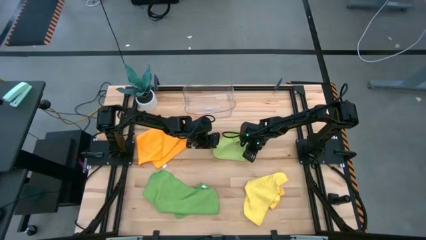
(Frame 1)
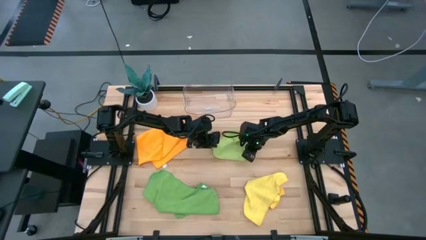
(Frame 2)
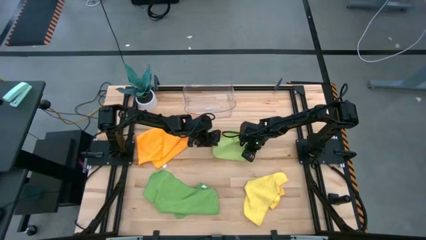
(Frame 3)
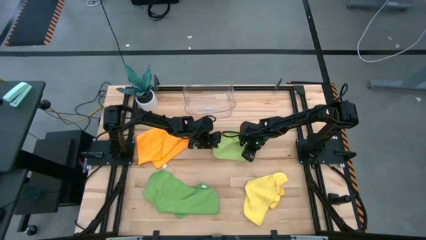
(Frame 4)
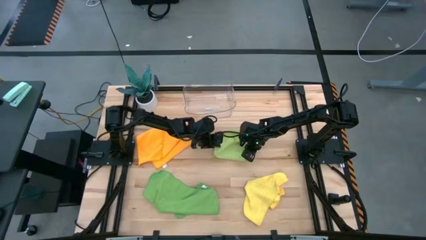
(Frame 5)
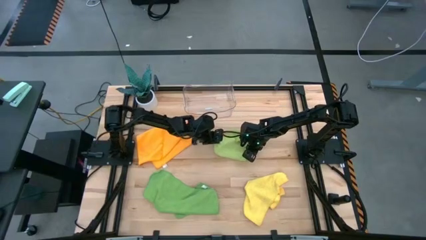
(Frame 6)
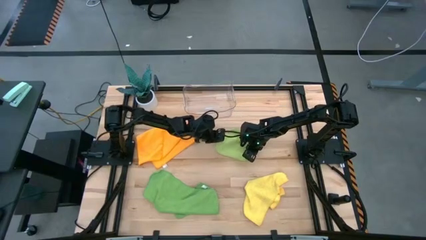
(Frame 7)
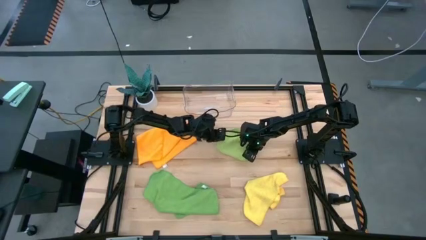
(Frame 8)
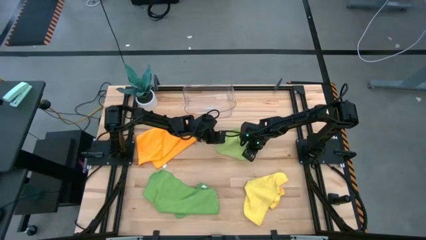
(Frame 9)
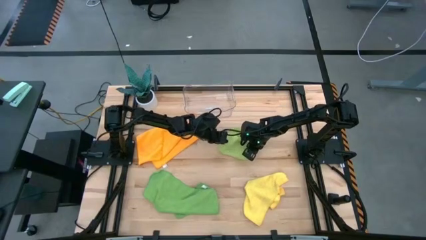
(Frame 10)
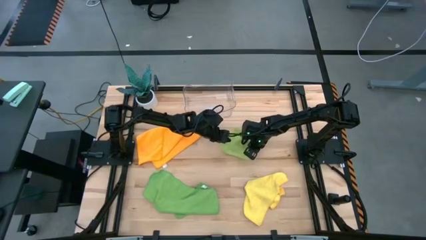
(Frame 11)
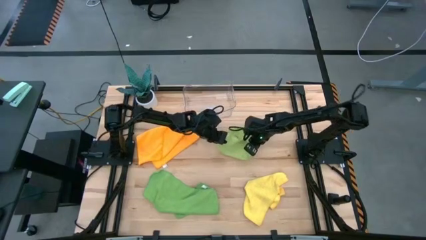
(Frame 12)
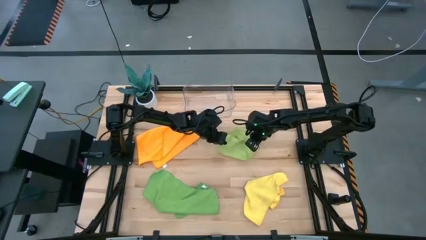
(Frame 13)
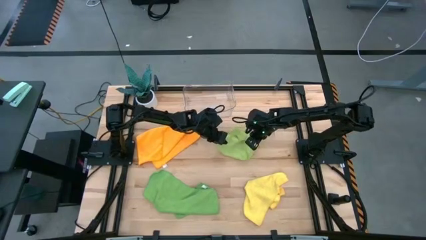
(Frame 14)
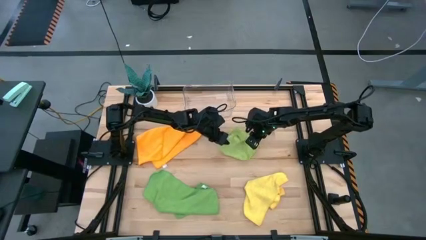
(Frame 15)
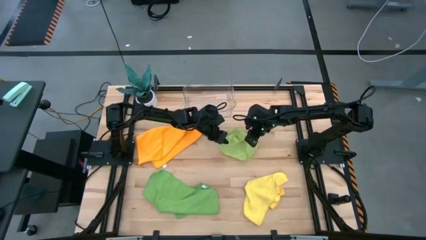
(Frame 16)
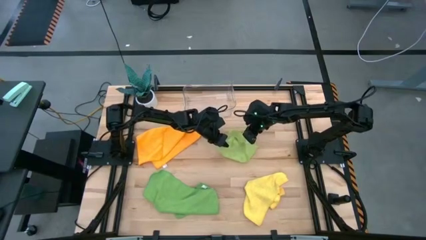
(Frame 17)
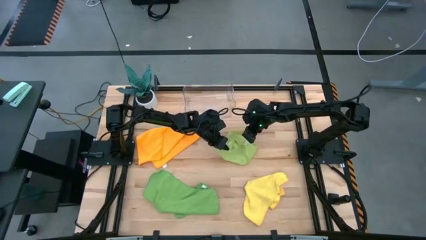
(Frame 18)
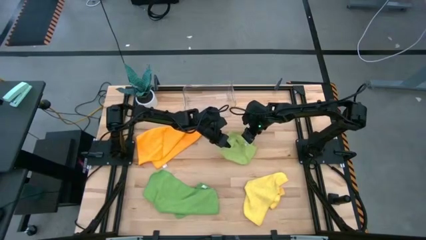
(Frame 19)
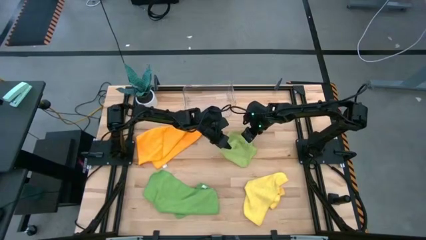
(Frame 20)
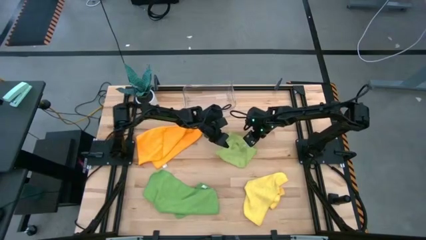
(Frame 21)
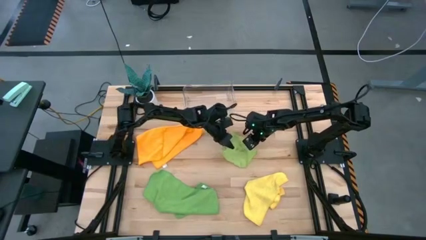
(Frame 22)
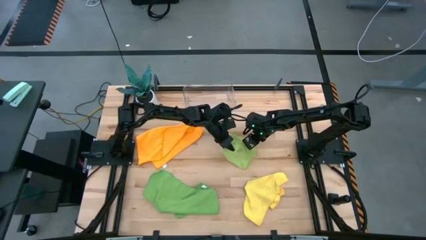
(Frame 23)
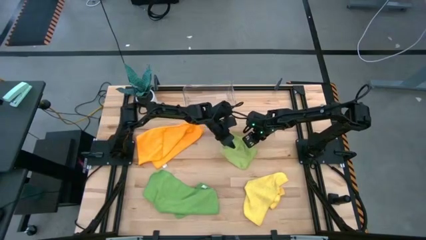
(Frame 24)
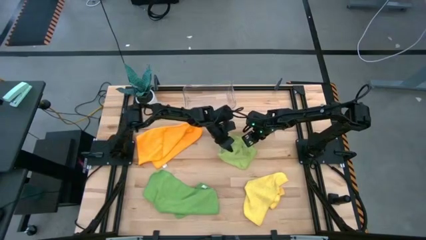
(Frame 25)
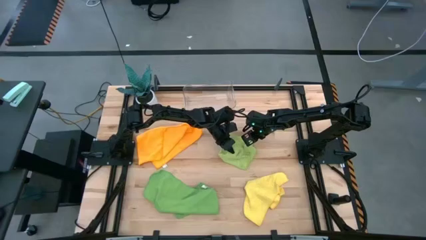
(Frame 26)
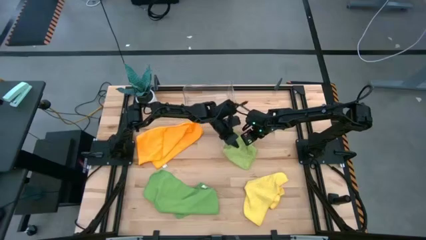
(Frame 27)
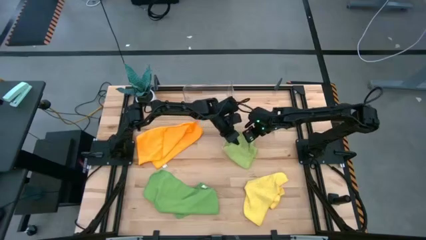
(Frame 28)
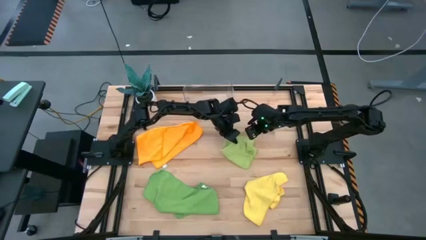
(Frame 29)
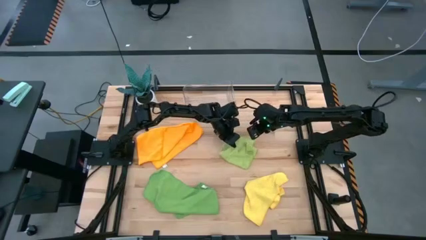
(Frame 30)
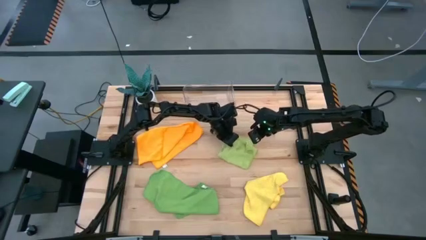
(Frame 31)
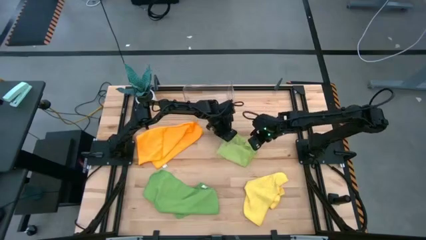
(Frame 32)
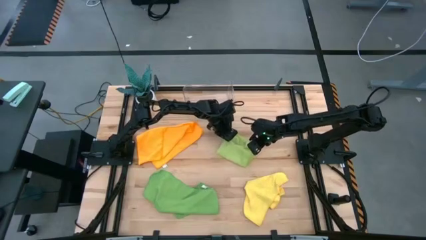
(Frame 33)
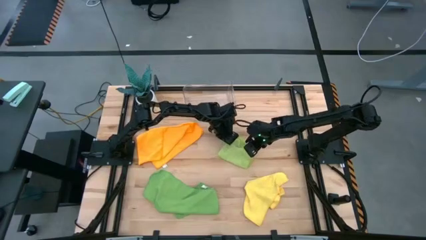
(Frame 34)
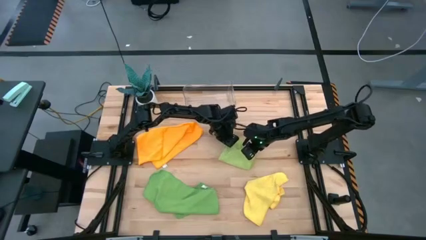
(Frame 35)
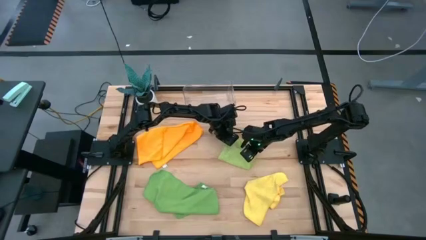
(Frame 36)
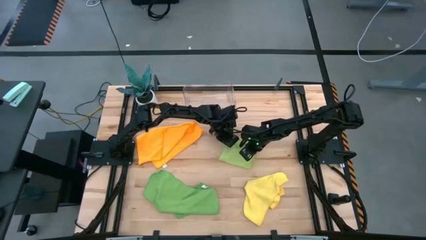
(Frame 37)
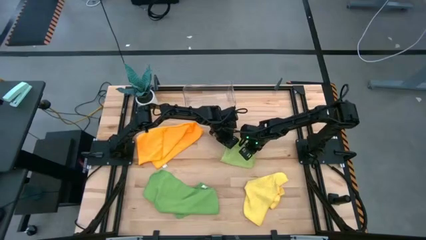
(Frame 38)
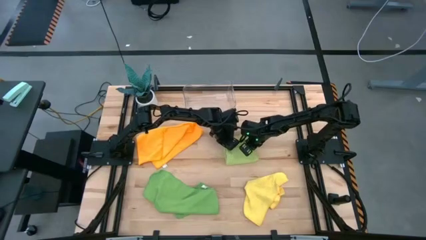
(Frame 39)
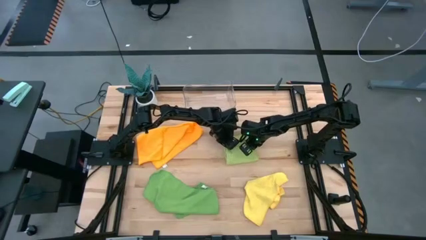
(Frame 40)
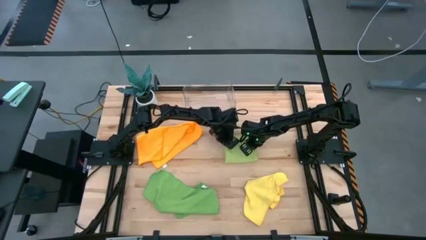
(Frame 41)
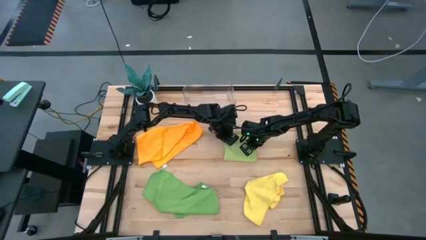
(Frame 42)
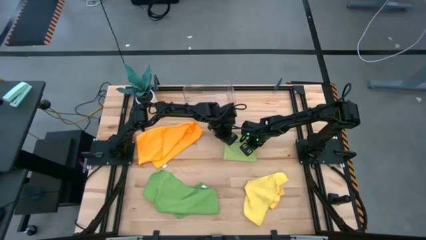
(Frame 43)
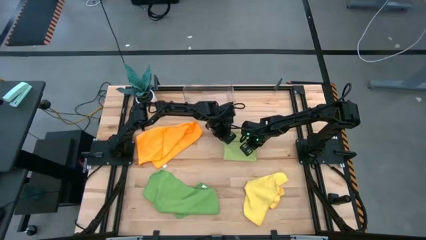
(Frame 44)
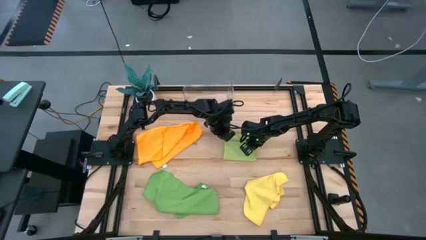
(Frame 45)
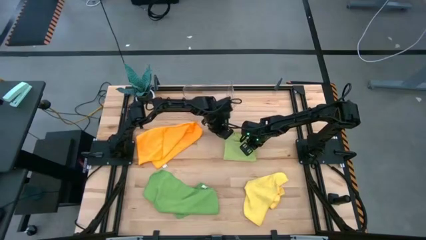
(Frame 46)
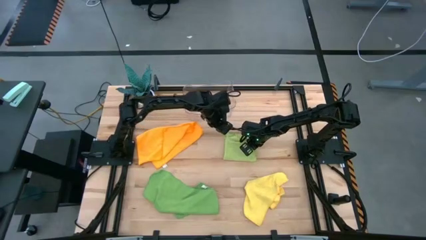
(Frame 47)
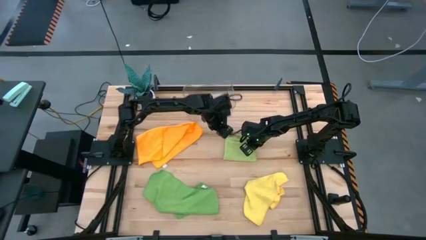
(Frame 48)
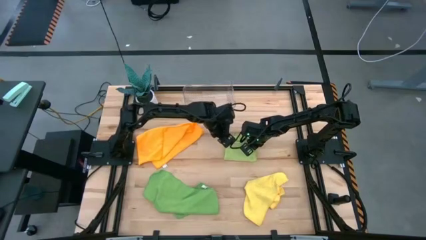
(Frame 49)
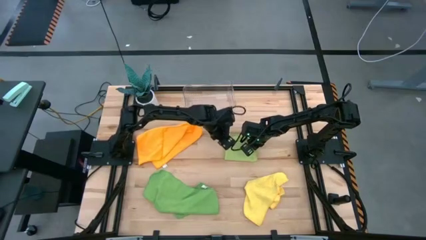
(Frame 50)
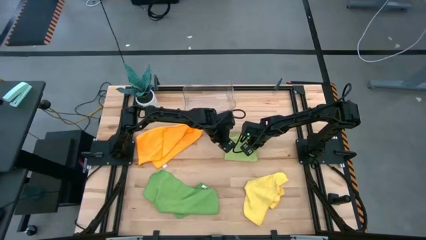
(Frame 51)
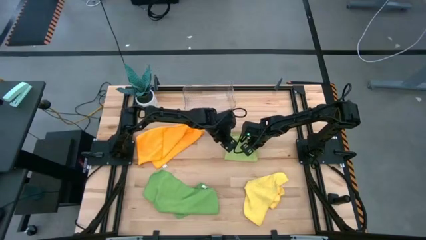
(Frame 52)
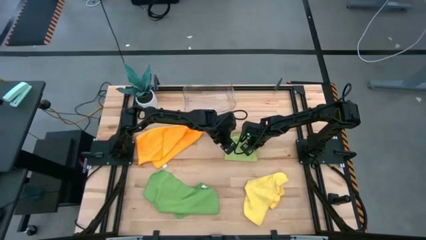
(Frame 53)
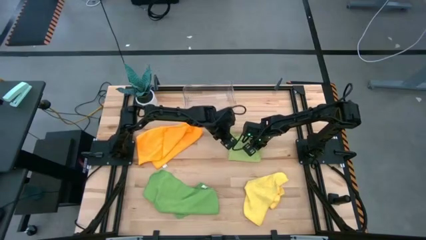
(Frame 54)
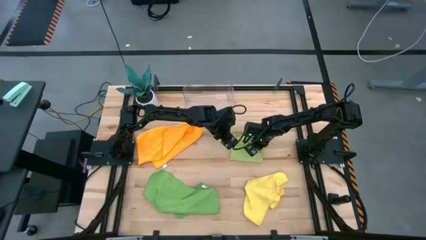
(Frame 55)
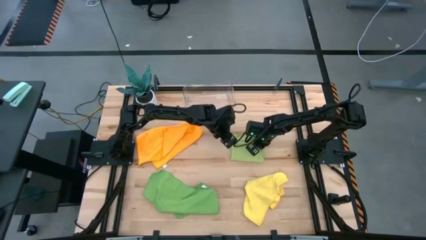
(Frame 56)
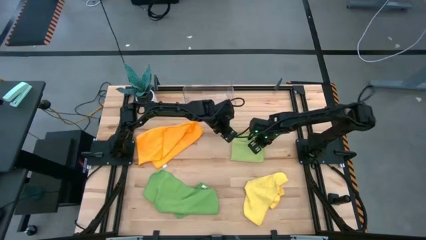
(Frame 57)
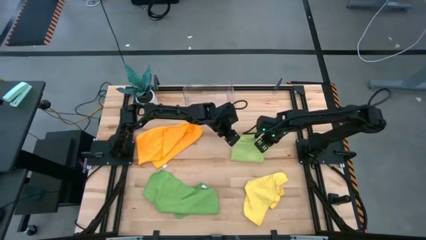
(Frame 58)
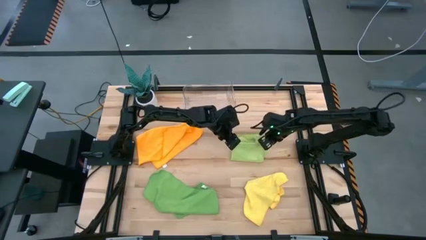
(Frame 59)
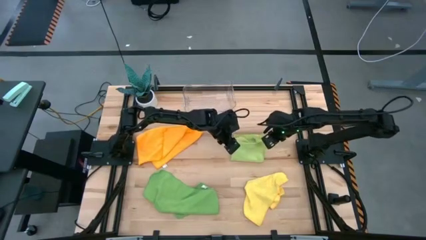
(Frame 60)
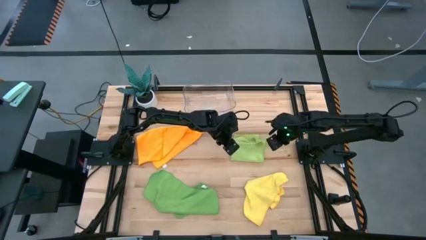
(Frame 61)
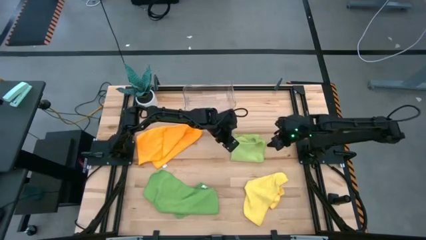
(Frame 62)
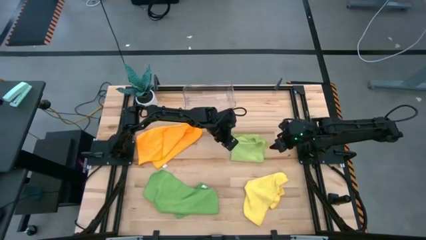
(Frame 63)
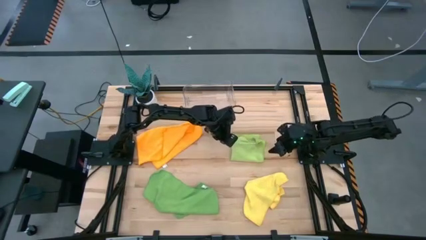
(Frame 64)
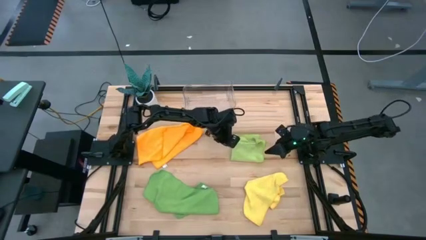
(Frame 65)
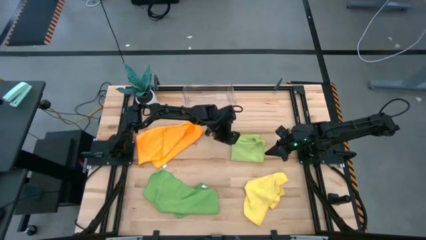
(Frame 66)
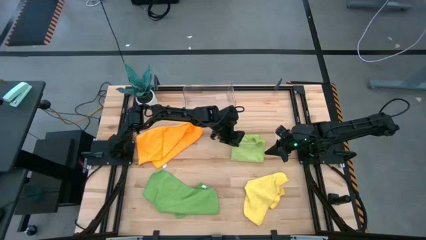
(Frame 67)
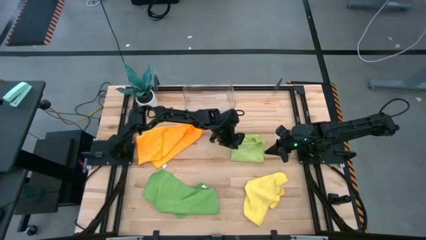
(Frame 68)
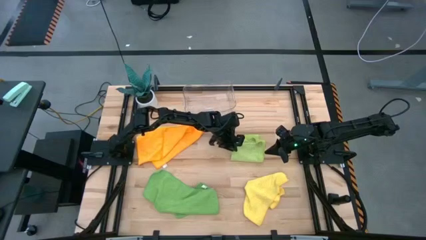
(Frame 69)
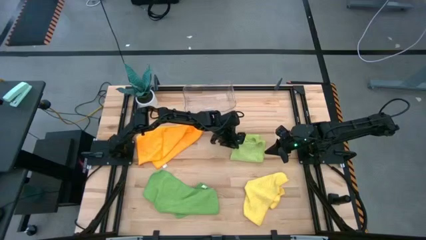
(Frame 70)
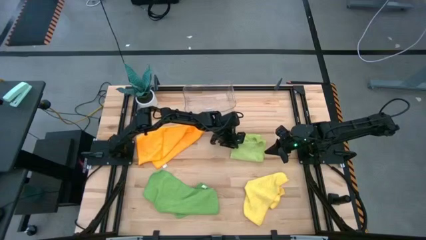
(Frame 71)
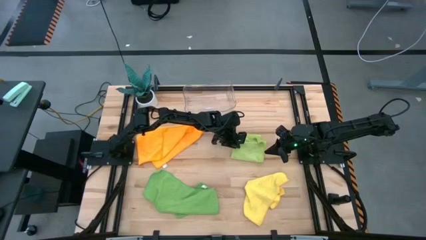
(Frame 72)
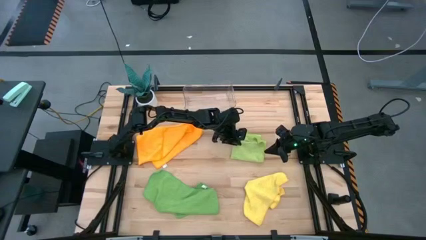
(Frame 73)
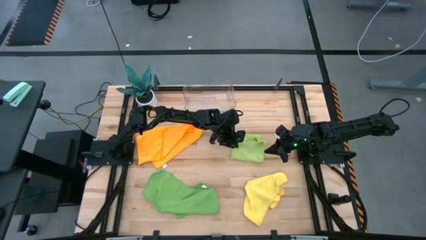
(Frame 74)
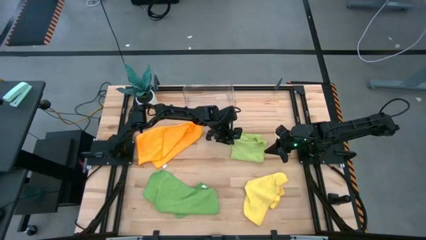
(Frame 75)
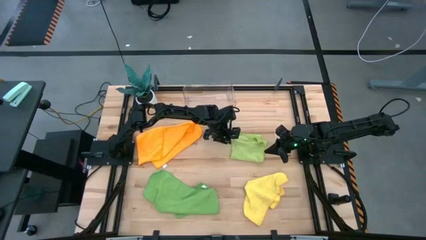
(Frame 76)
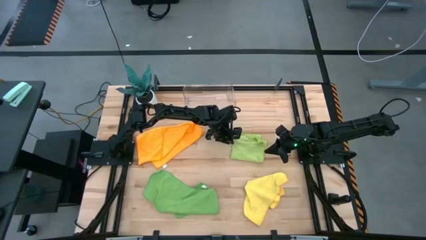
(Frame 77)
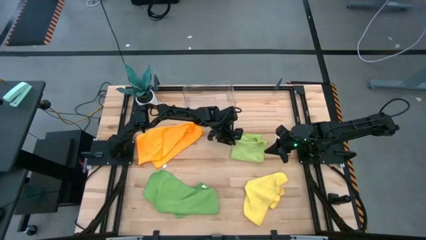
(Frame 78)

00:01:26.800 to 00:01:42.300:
Task: Fold microfiber towels
Fold the light green microfiber cloth
